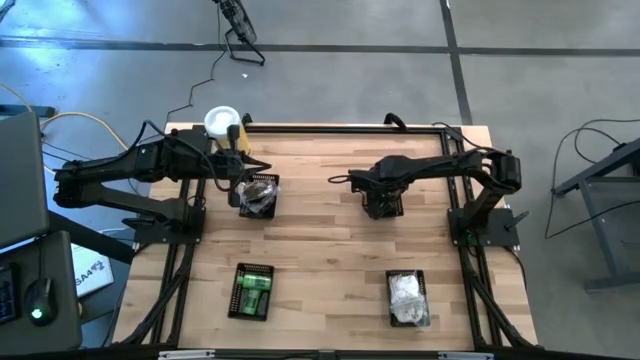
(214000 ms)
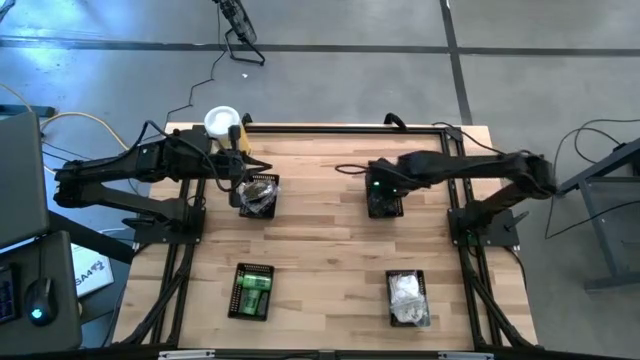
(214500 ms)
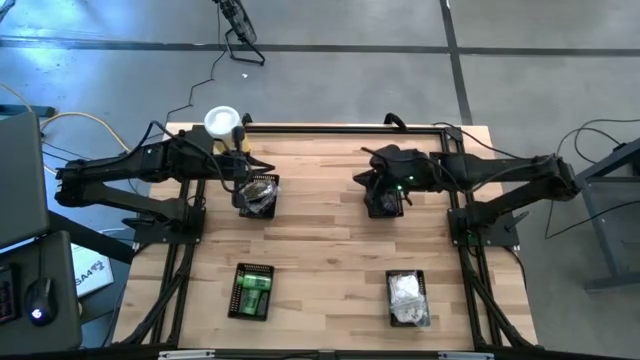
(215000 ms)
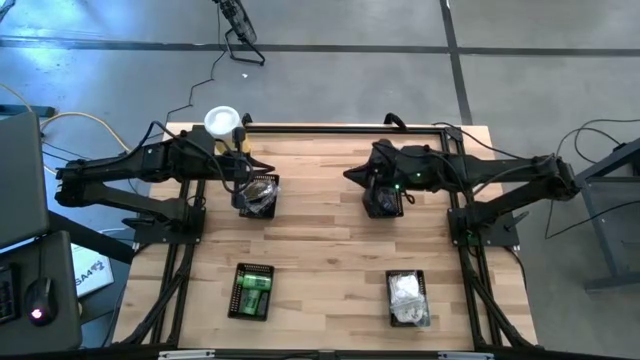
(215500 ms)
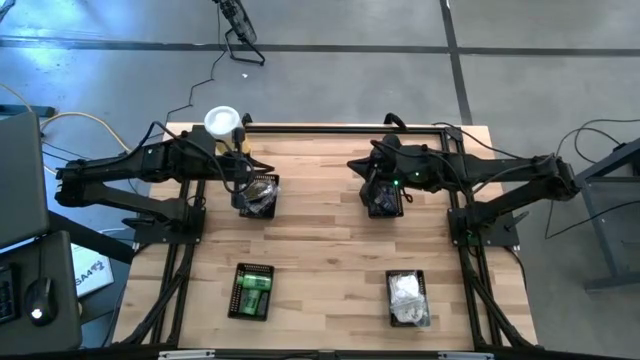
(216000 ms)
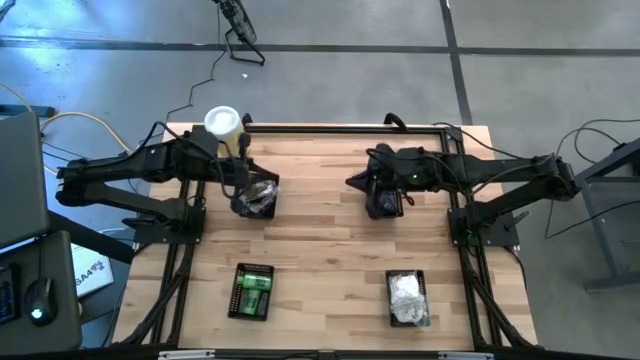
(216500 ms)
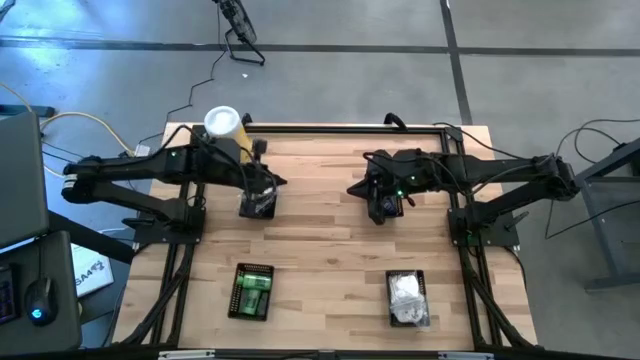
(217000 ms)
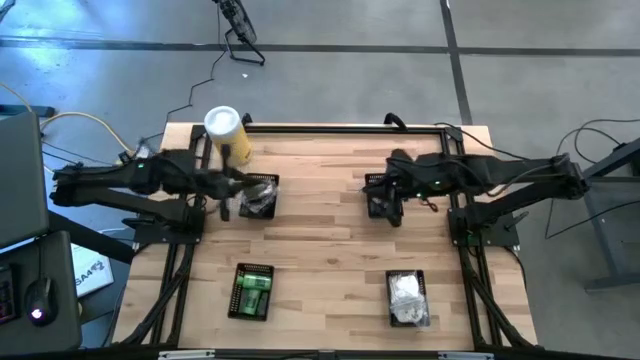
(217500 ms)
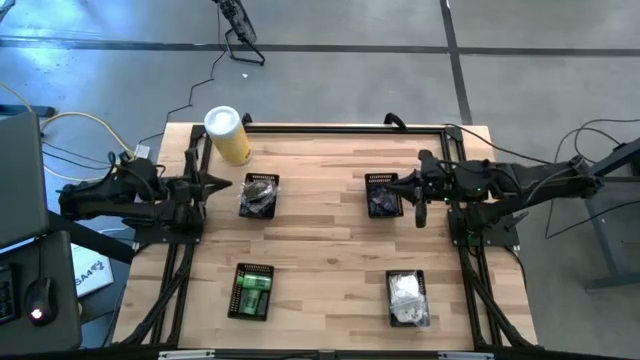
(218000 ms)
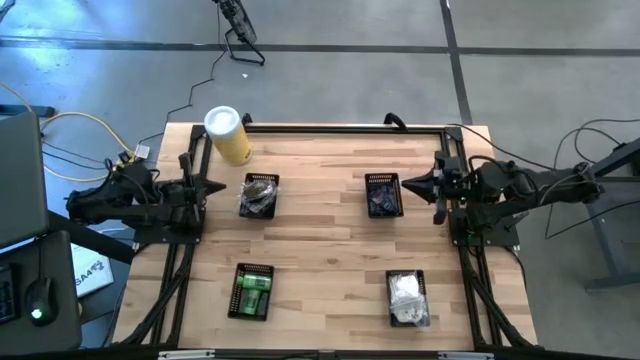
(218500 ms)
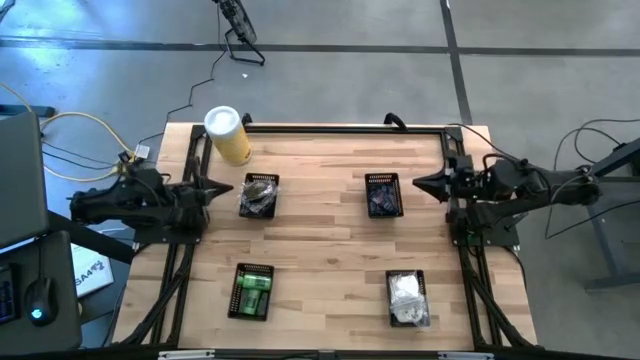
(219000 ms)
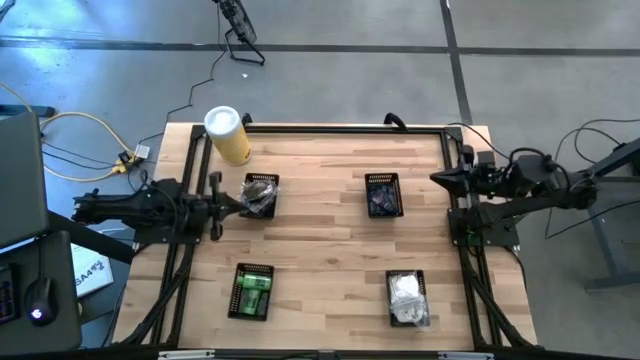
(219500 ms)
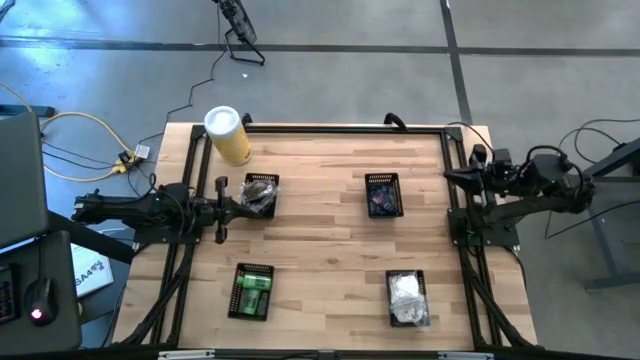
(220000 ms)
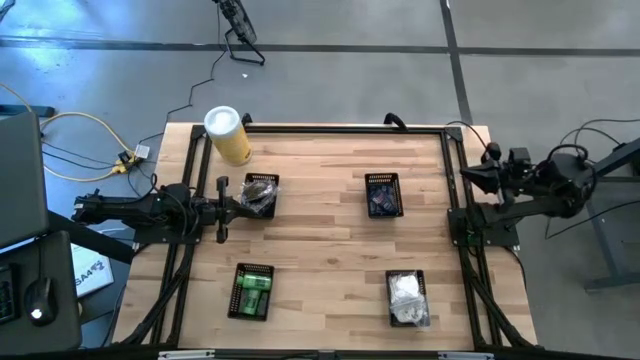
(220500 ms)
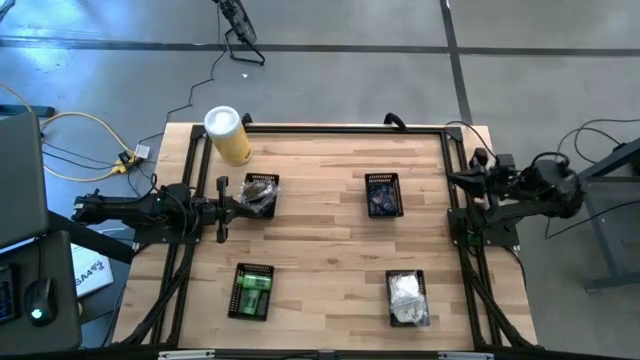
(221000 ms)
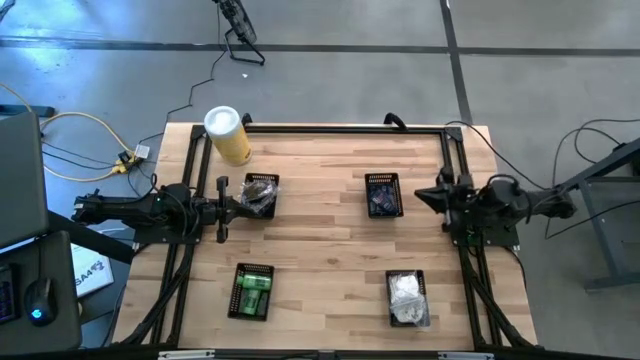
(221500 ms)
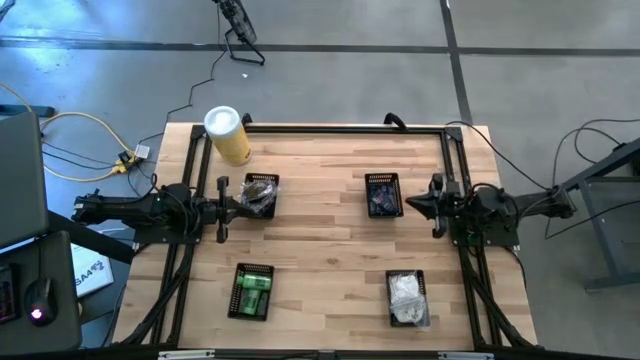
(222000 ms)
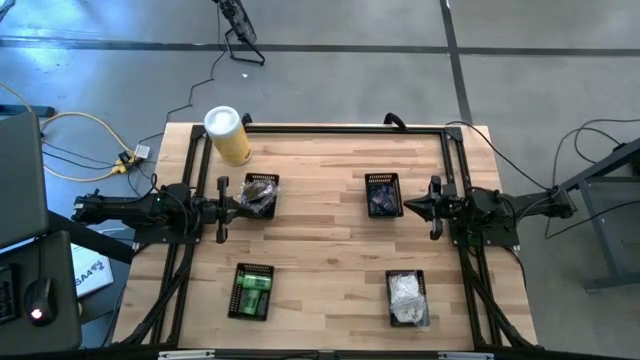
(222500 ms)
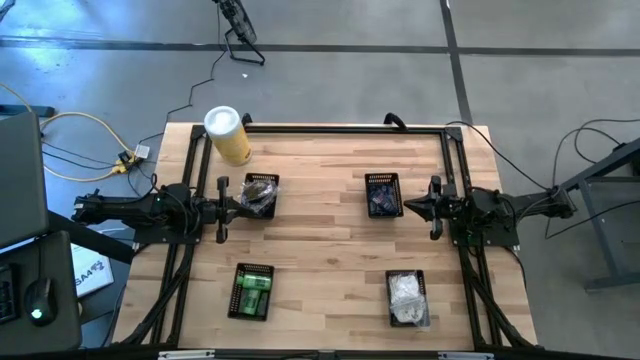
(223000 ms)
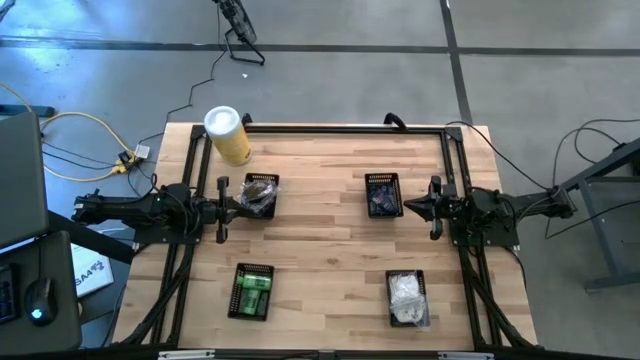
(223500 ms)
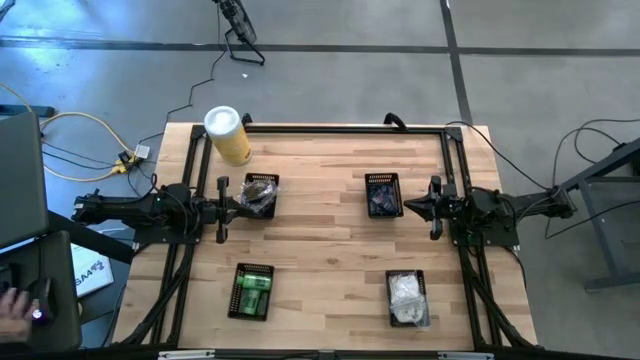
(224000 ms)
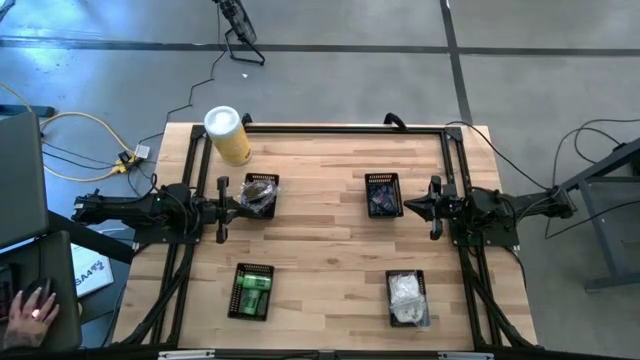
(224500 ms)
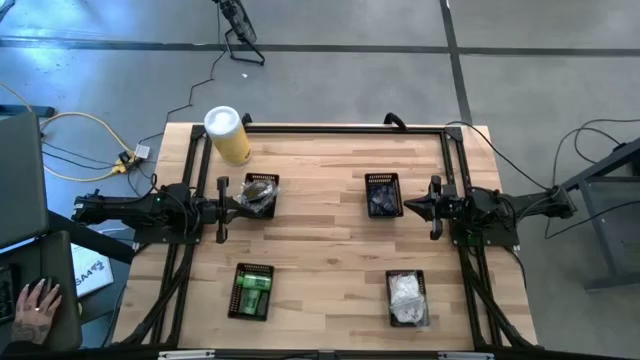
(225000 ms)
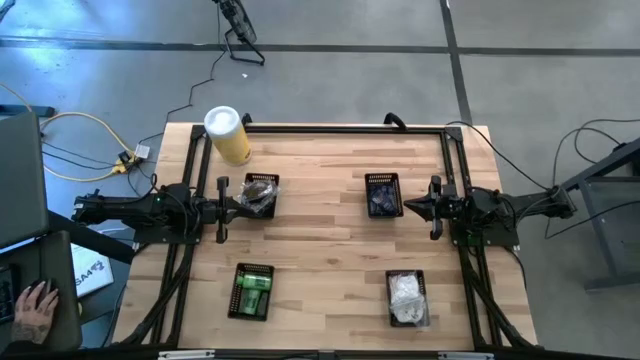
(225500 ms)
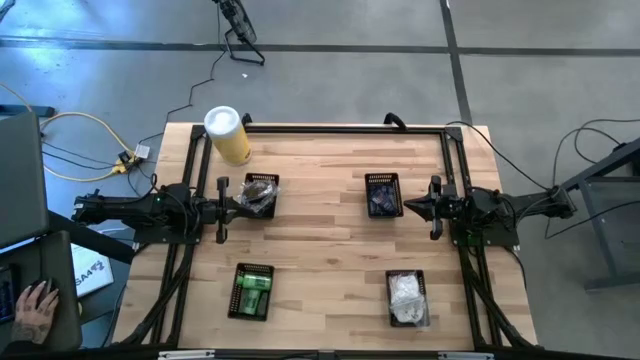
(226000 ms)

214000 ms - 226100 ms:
Task: Pick & Place Travel size toiletries
Return to Home Position

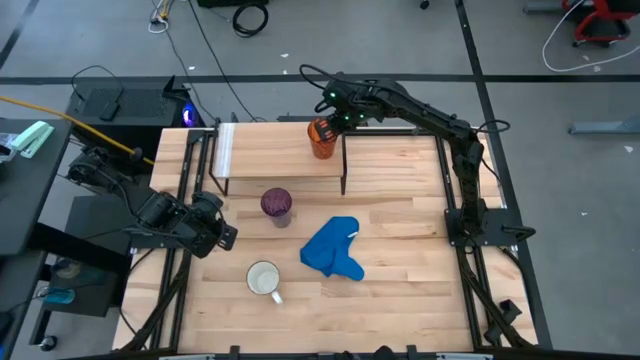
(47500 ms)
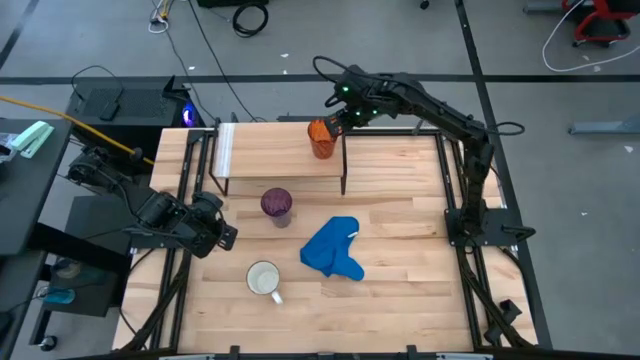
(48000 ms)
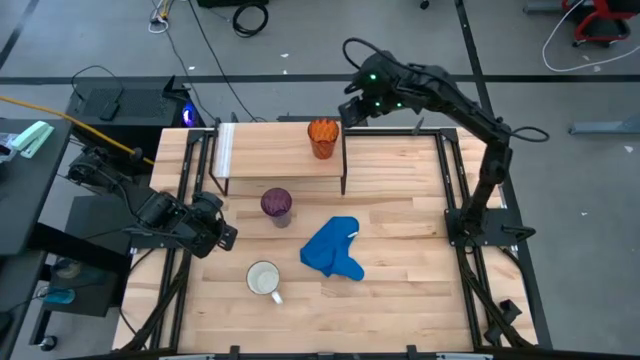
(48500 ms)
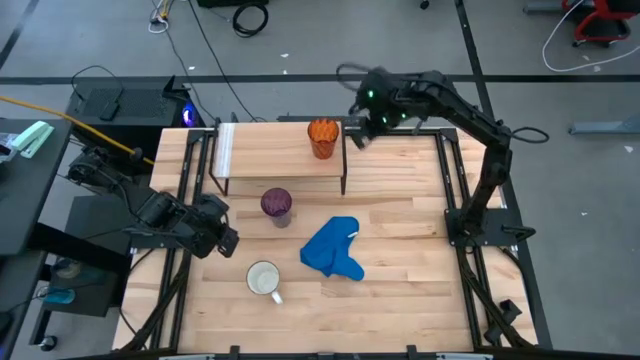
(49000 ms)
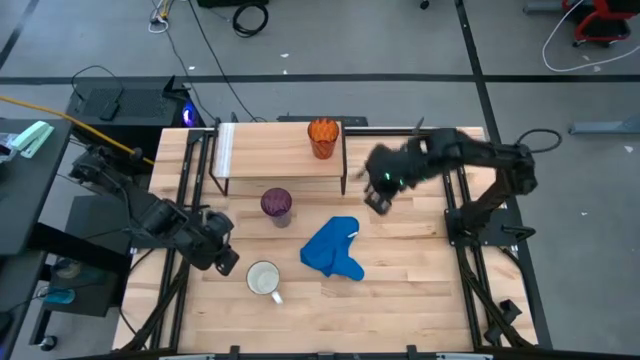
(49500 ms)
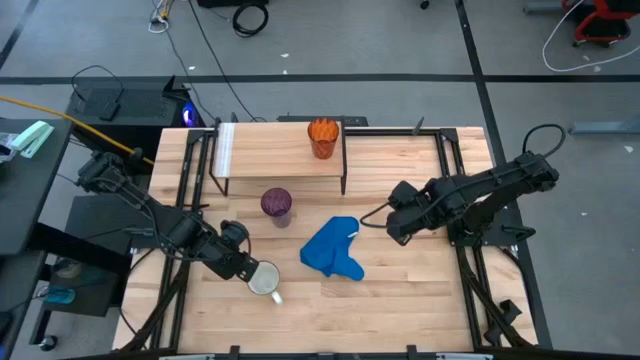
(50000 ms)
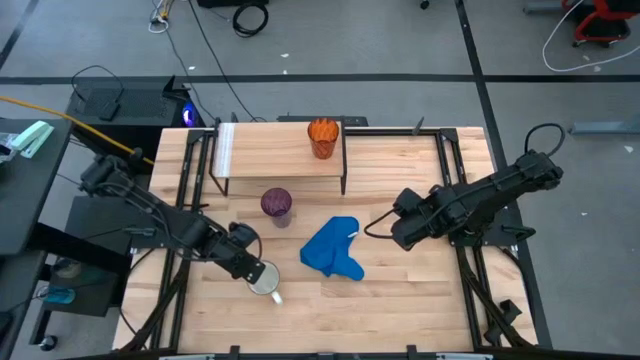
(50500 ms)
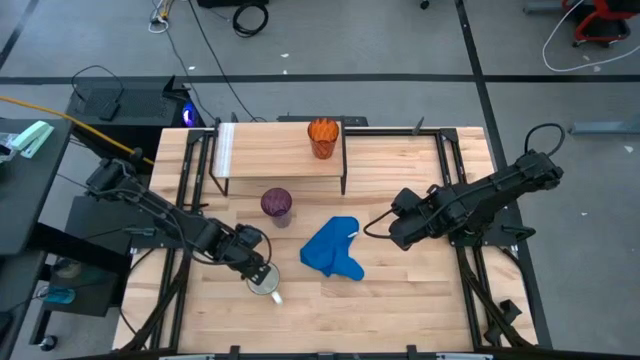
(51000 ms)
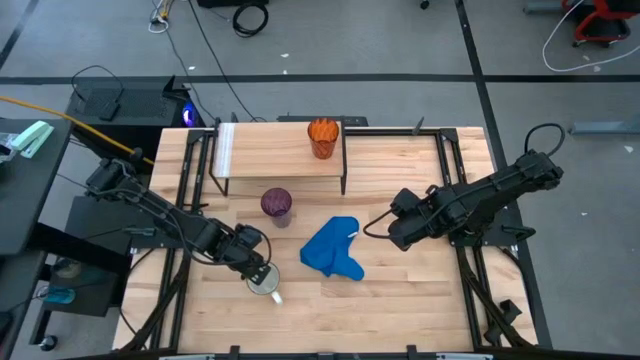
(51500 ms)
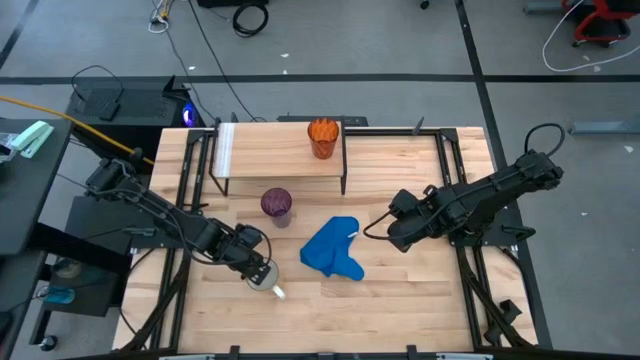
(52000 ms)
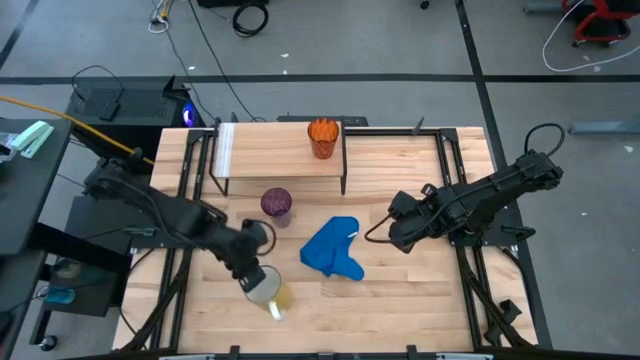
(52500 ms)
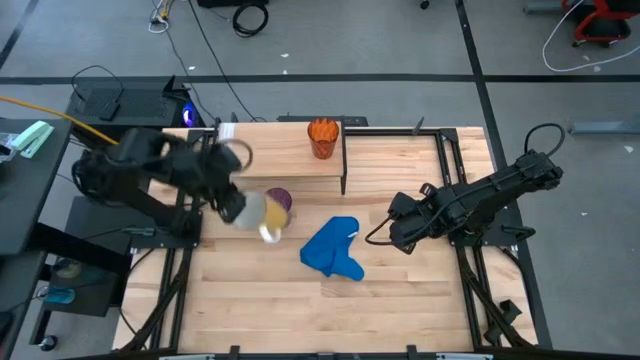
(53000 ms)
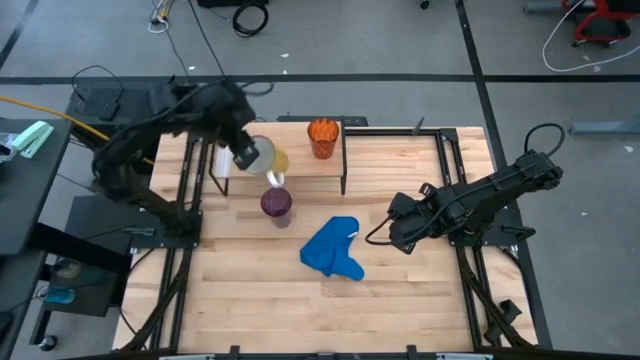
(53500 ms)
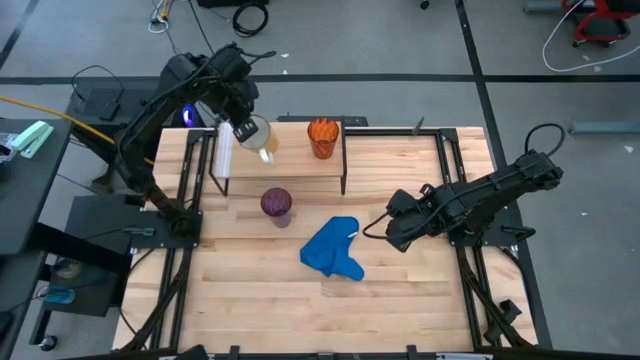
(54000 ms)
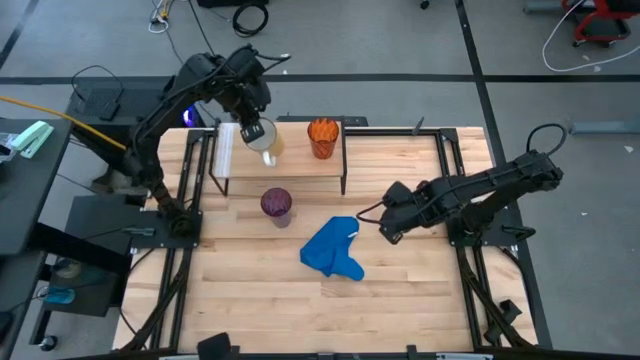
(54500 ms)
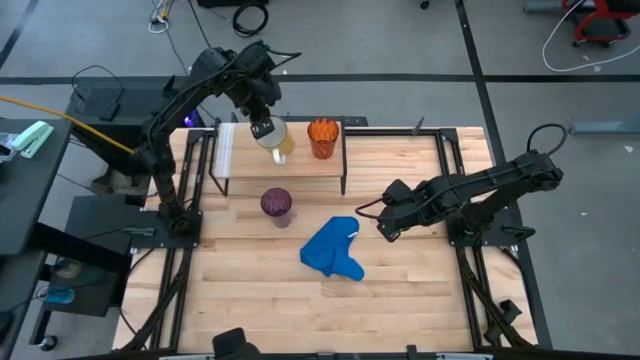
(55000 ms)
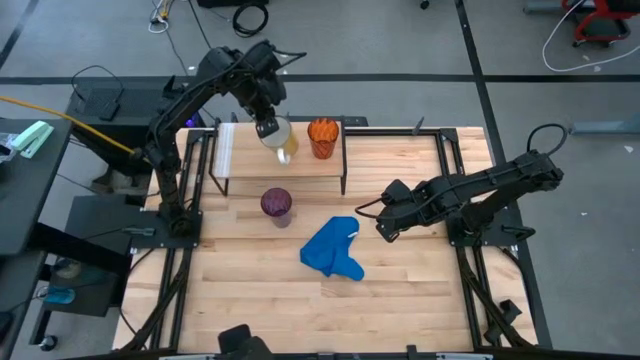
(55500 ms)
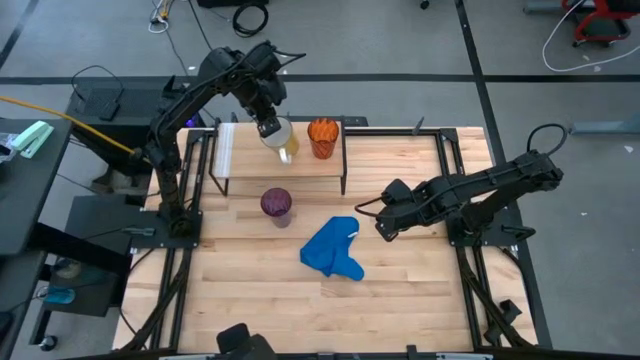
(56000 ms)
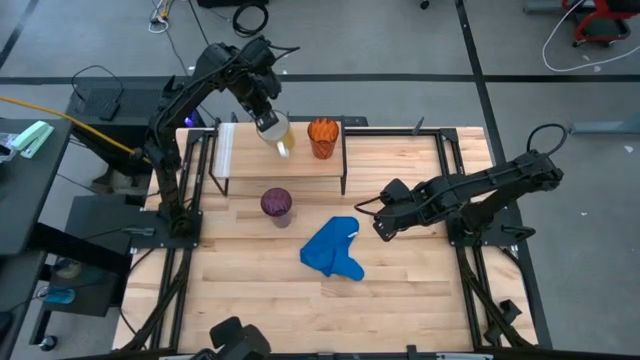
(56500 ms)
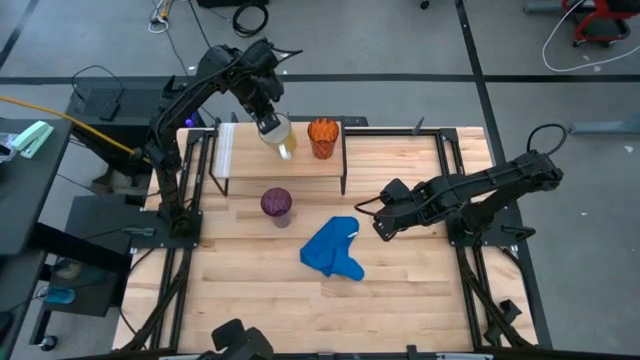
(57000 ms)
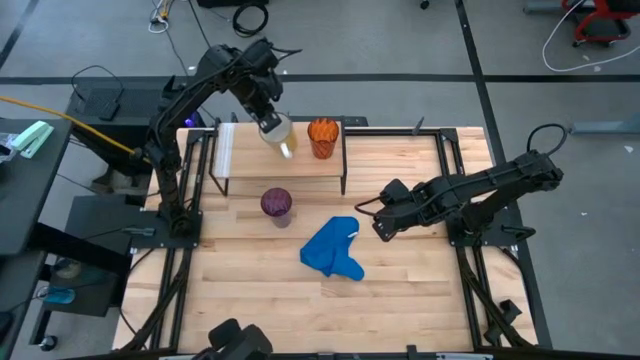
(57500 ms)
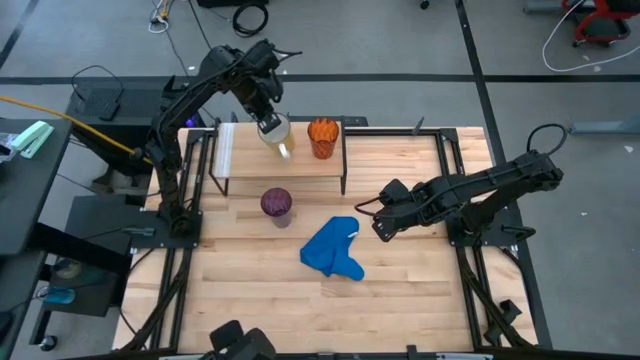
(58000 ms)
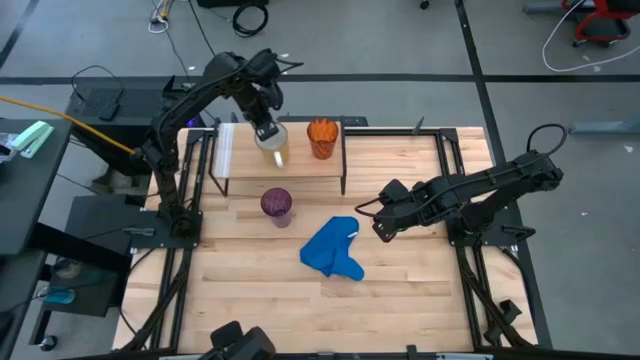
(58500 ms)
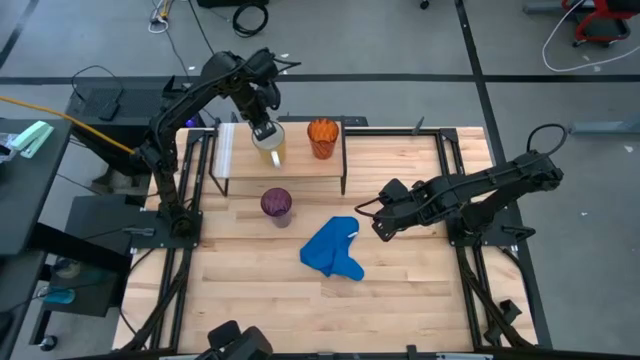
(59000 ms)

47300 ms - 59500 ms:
Task: Stack small to large cups/mugs on shelf
Put the yellow mug on the shelf
